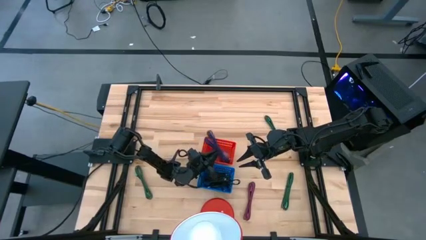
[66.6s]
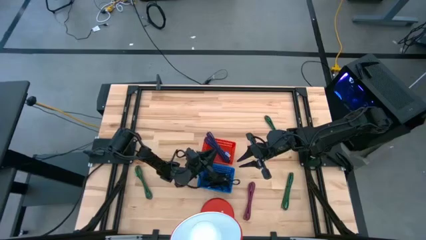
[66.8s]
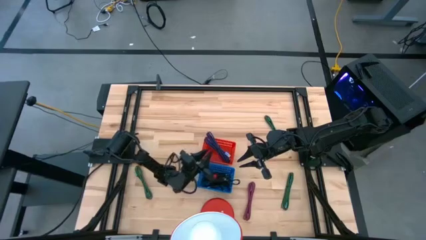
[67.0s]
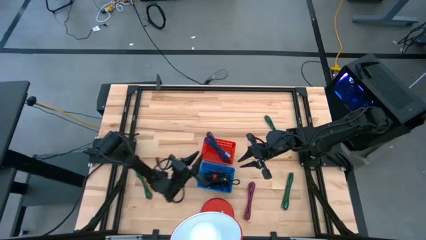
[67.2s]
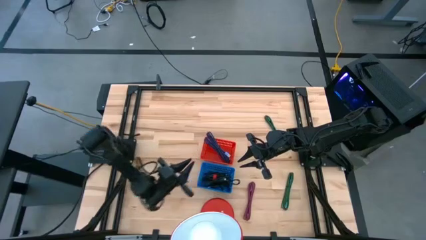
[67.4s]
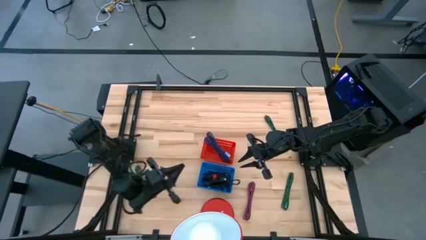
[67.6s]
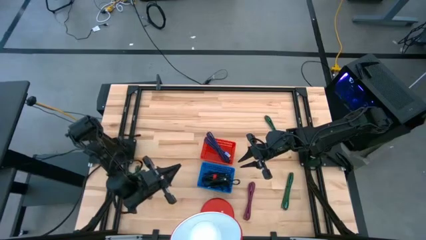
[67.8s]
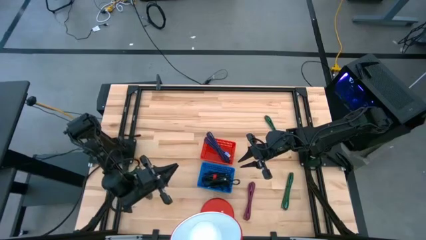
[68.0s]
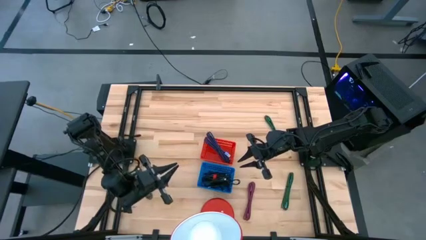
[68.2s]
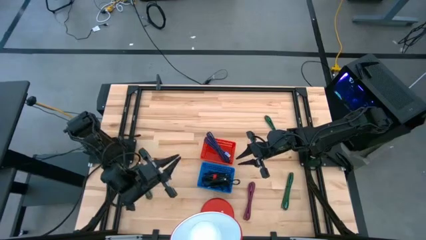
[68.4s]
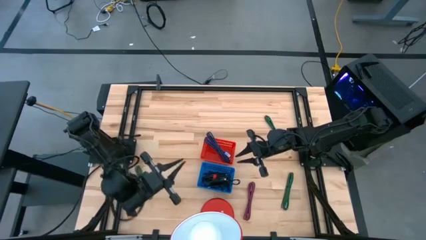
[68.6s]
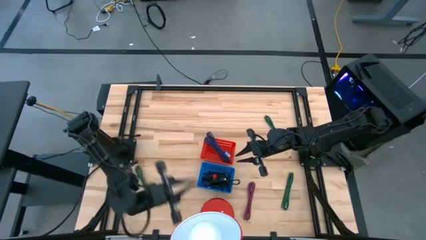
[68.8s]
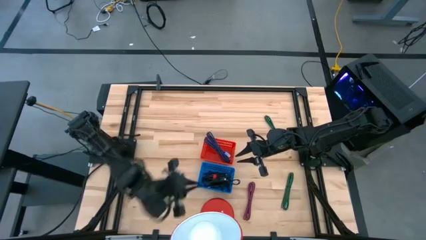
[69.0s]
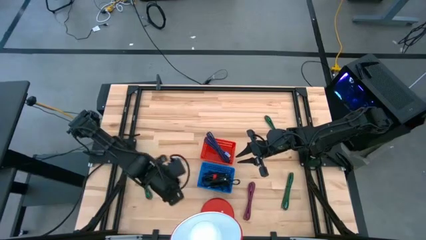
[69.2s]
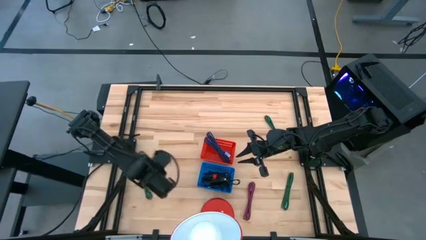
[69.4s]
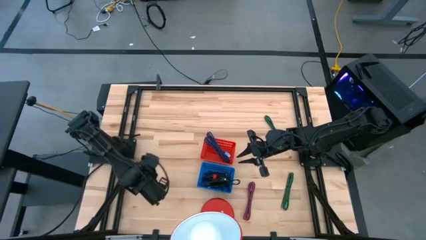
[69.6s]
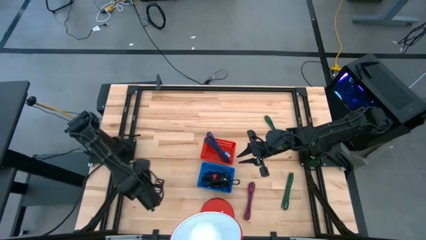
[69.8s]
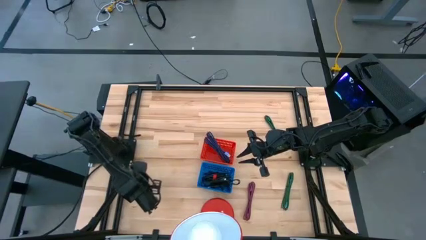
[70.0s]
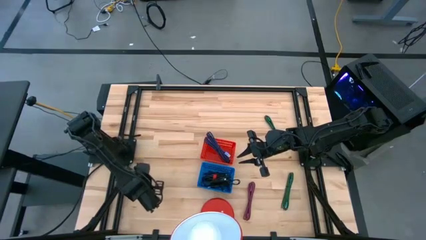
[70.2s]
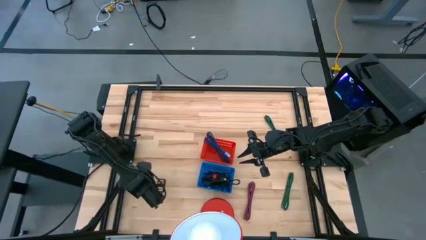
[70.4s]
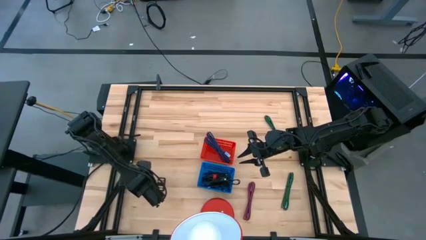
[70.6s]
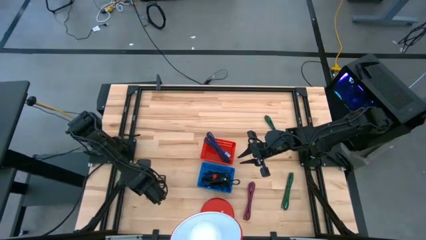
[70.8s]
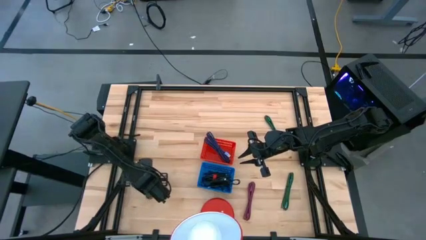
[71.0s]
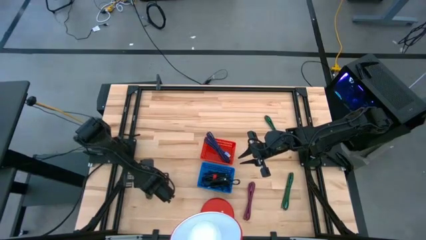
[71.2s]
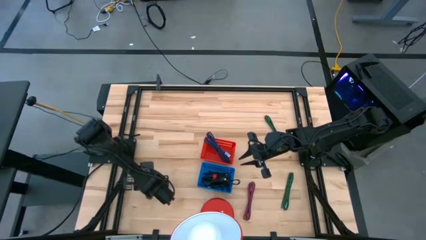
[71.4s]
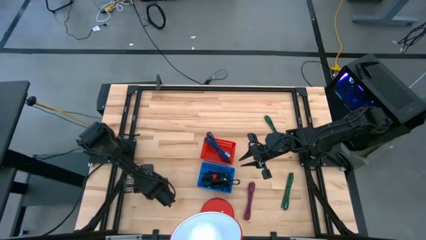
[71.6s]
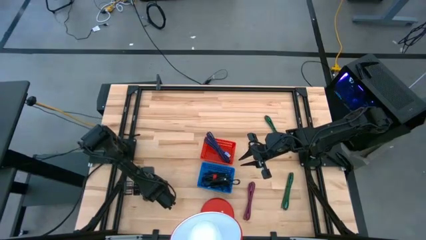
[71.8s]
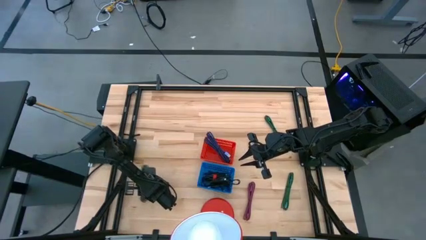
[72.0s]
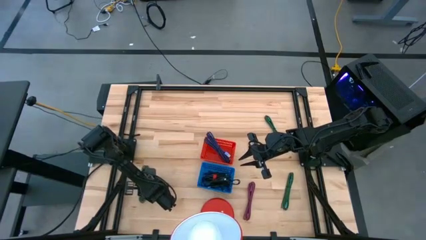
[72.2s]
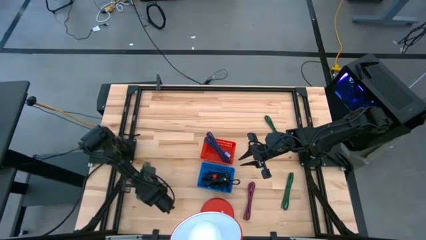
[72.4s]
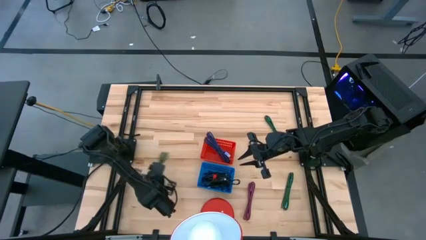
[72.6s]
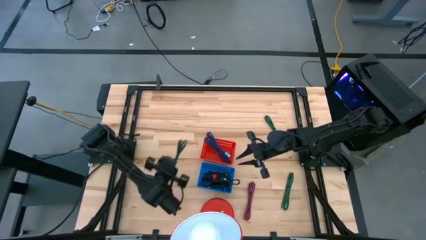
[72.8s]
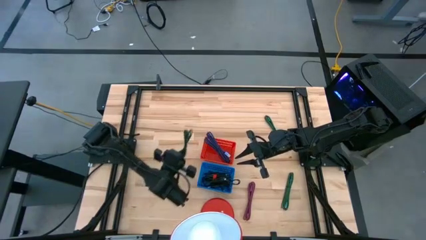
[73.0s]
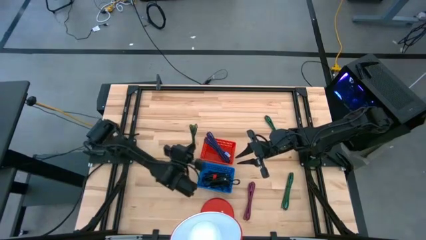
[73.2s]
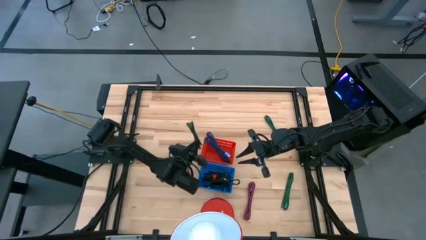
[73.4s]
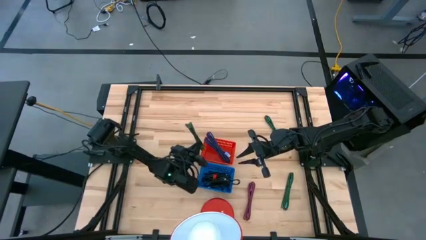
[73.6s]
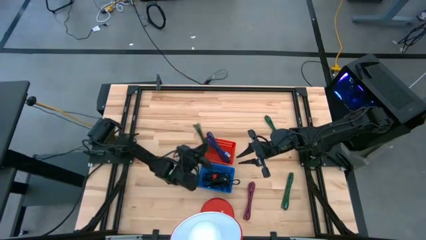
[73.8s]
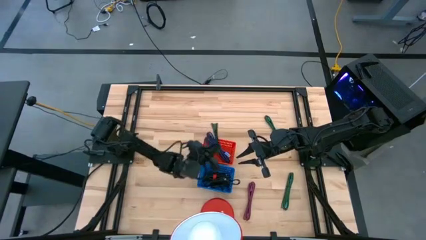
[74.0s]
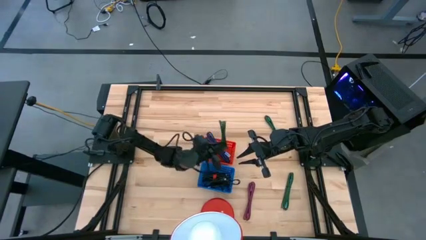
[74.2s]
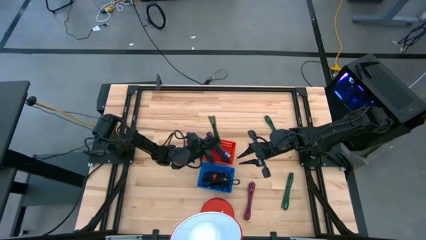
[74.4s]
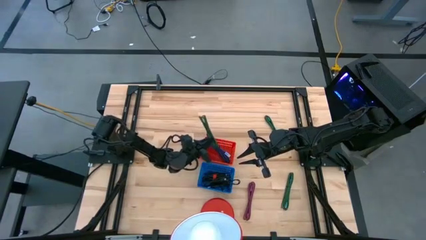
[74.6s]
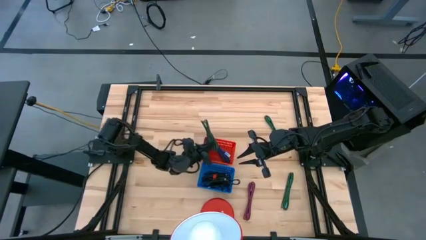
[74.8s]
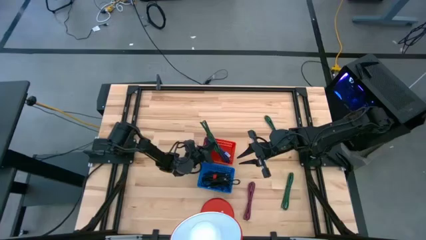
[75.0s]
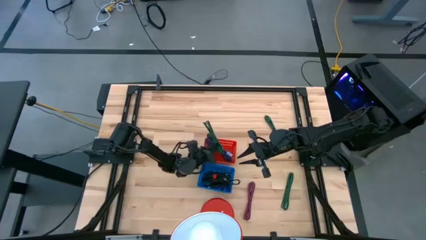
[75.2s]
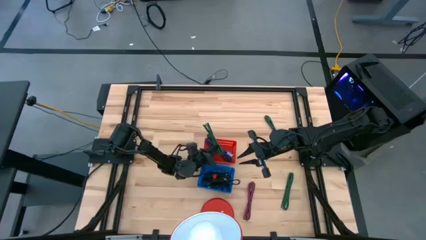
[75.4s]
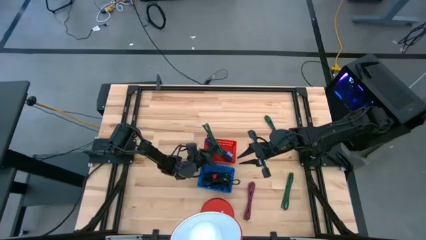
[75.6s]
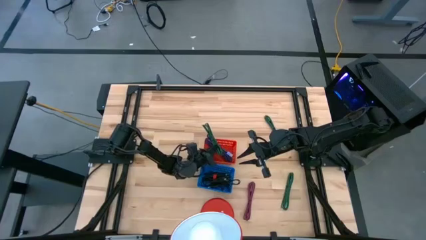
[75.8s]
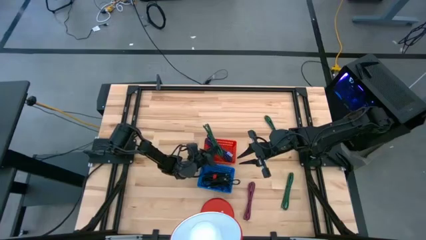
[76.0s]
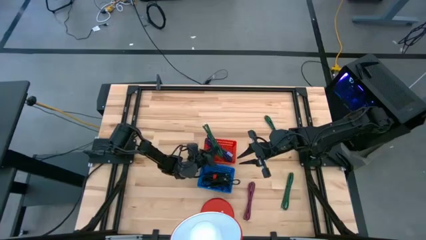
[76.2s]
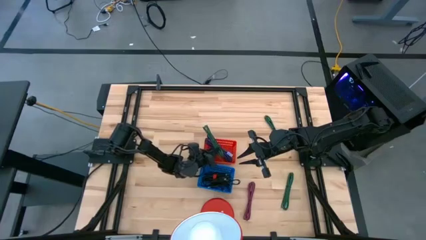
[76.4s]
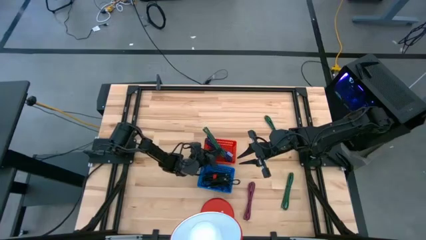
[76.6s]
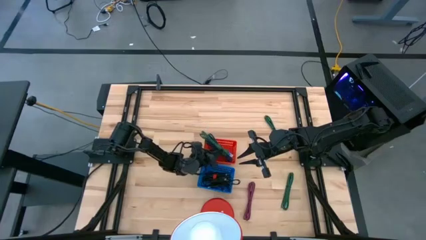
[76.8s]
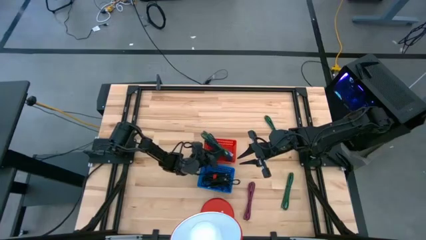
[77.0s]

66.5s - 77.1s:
Task: Pick & Place USB Port
Put the large green USB cable into the red bin

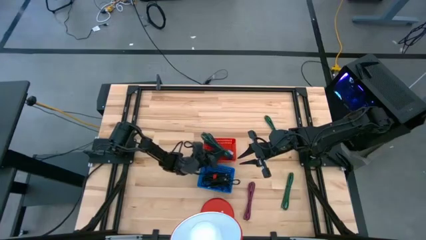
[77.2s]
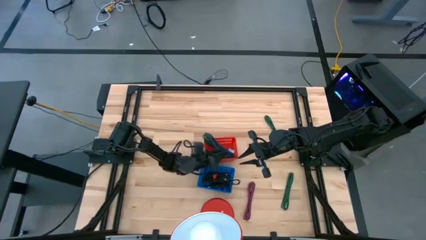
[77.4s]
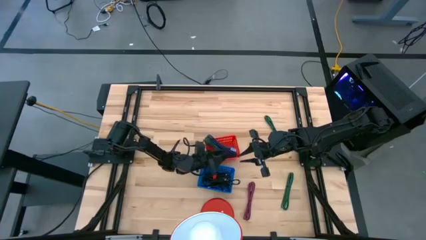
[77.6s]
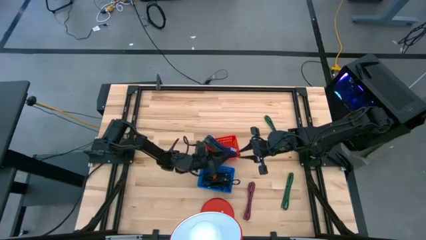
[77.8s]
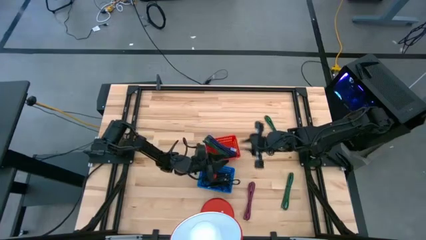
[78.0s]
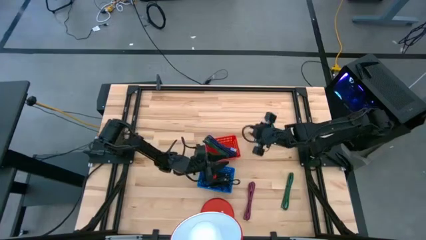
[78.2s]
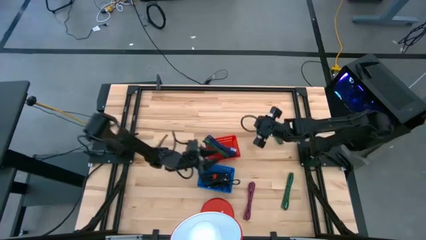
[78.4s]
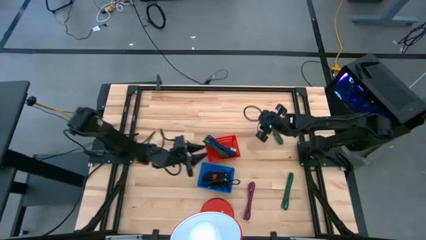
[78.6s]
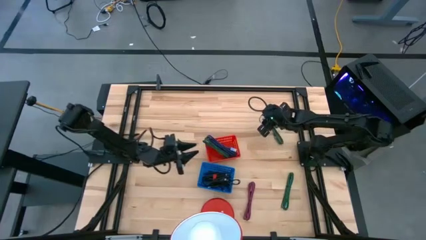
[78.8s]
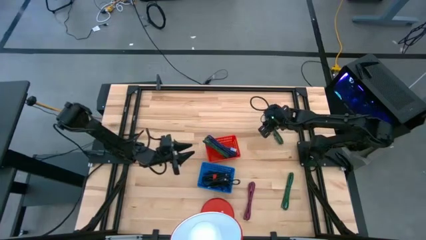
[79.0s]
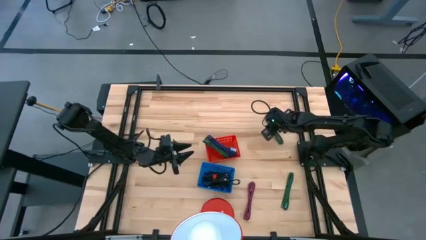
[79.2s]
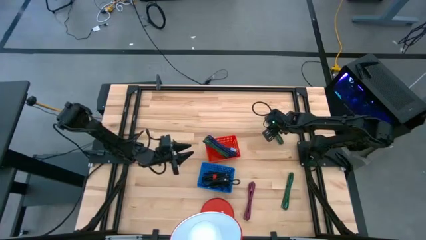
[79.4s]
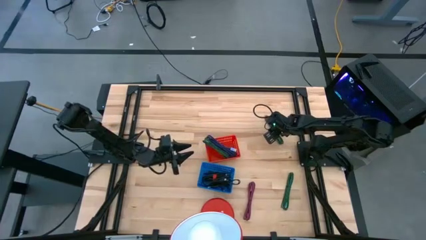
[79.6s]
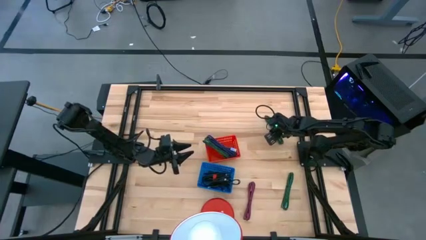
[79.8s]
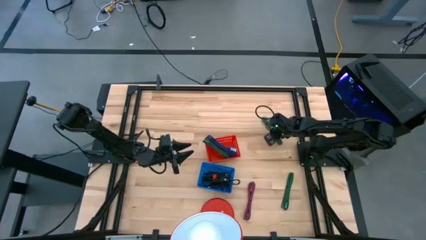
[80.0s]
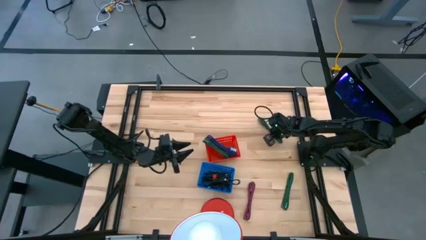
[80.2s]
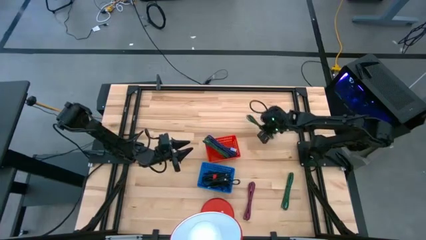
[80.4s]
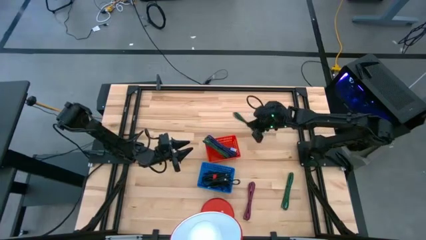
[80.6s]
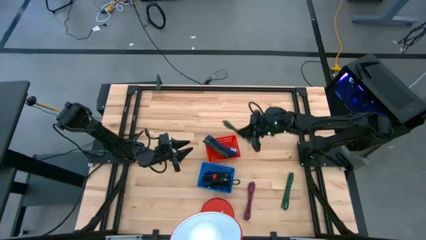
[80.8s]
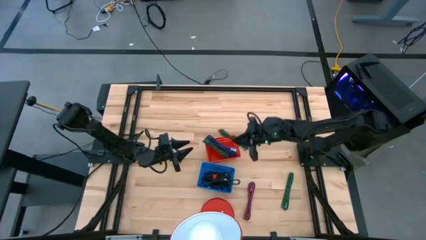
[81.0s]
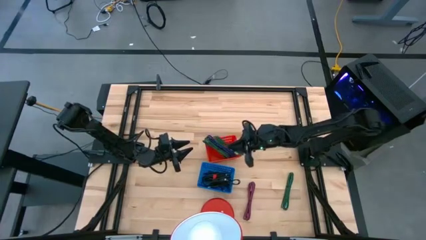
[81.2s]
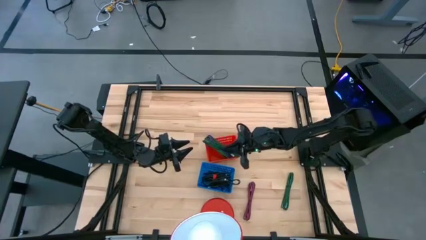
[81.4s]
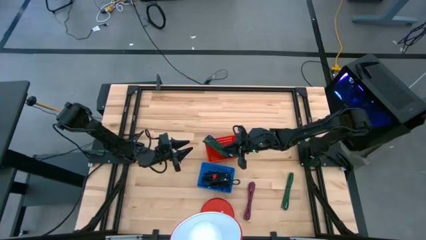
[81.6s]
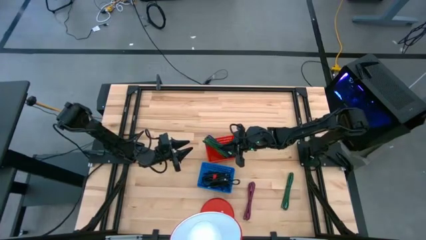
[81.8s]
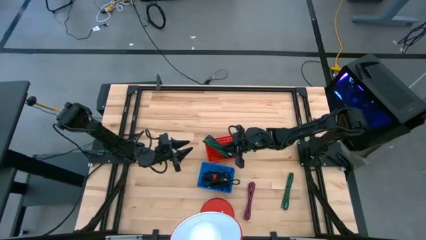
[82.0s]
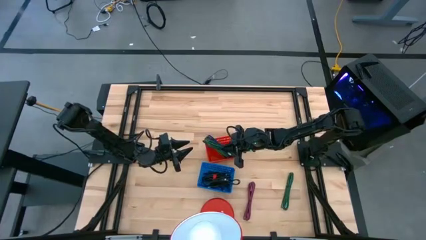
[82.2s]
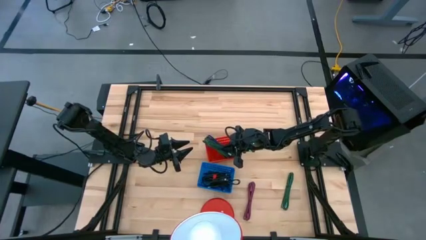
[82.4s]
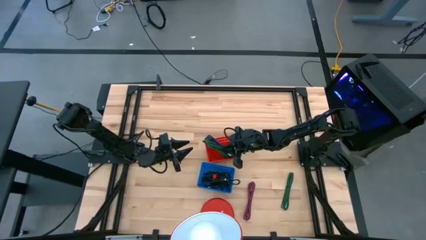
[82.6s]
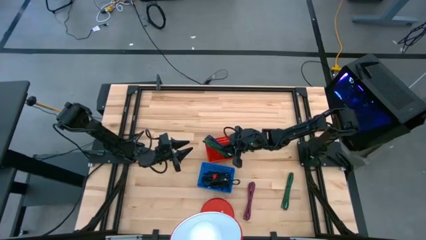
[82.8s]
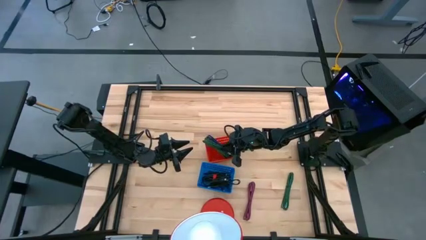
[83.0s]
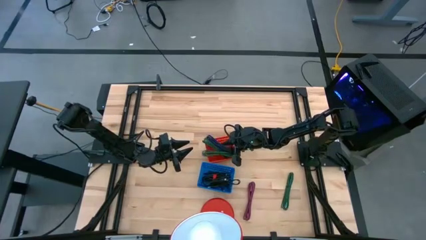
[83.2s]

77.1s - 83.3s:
Put the large green USB cable into the red bin
